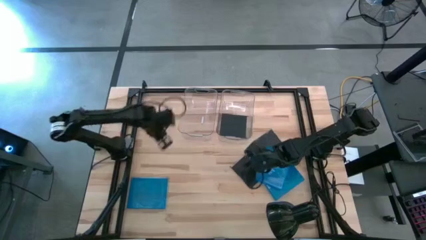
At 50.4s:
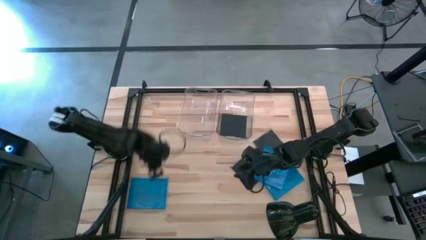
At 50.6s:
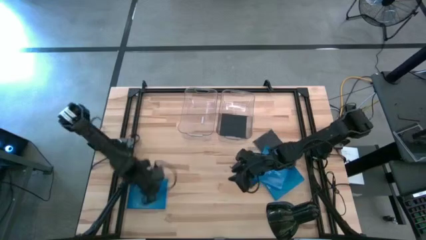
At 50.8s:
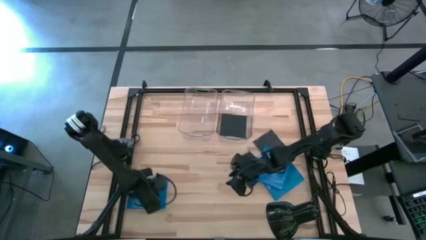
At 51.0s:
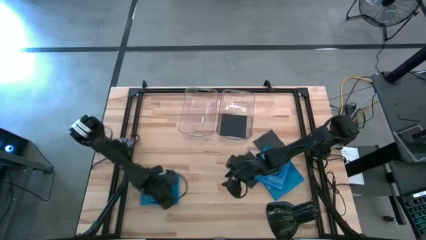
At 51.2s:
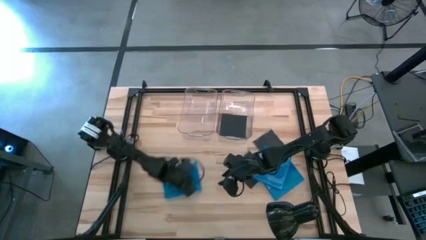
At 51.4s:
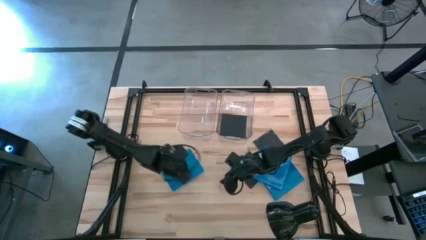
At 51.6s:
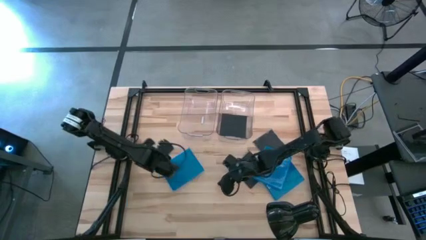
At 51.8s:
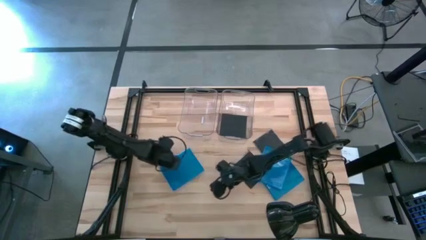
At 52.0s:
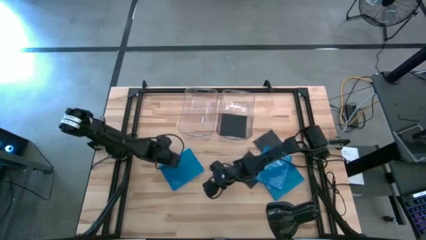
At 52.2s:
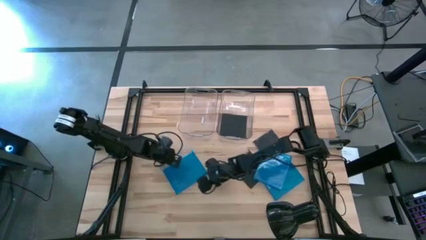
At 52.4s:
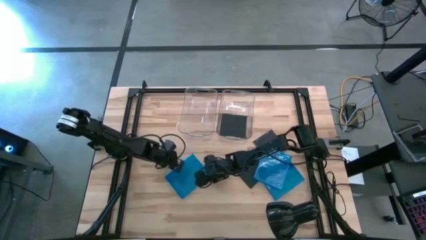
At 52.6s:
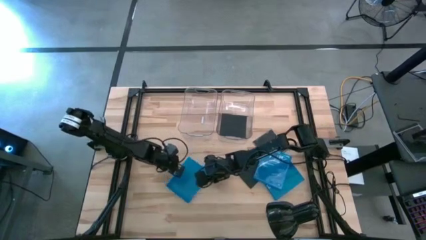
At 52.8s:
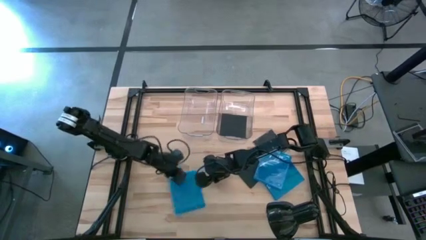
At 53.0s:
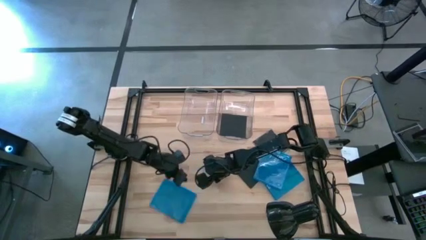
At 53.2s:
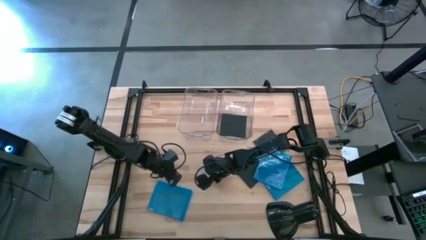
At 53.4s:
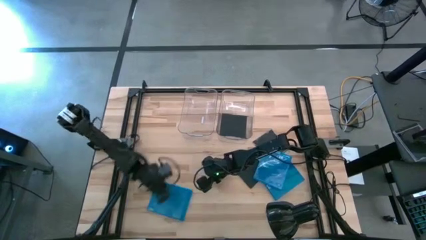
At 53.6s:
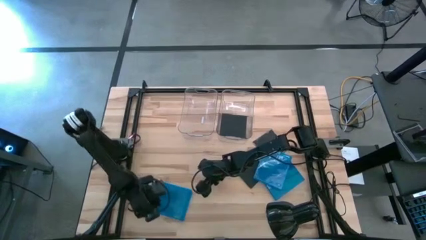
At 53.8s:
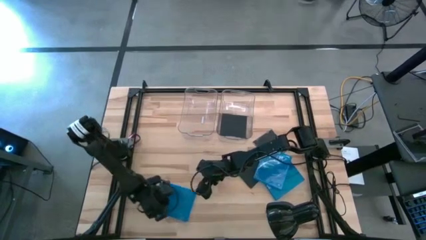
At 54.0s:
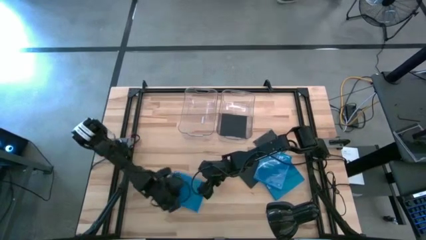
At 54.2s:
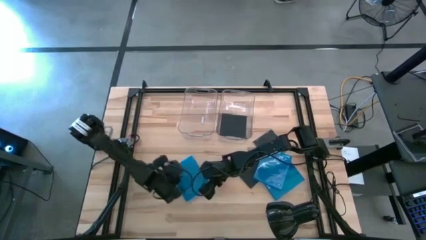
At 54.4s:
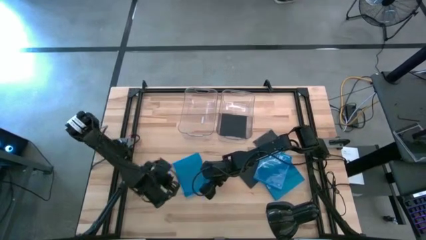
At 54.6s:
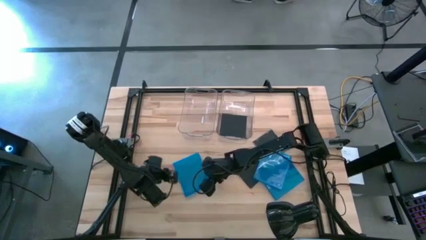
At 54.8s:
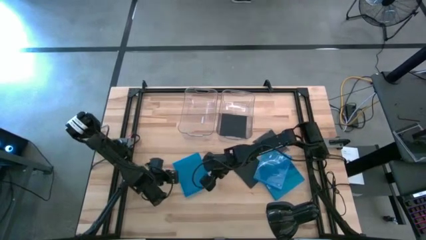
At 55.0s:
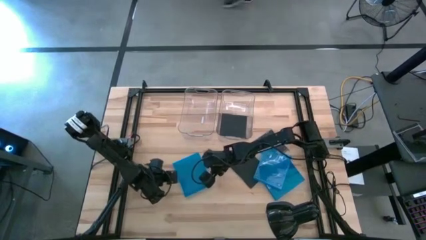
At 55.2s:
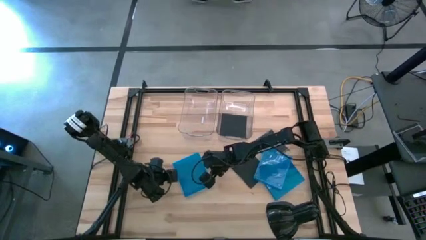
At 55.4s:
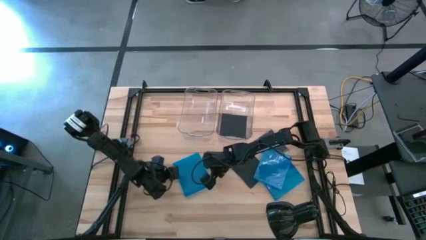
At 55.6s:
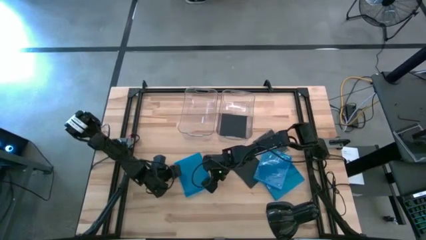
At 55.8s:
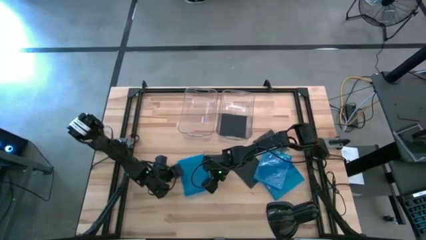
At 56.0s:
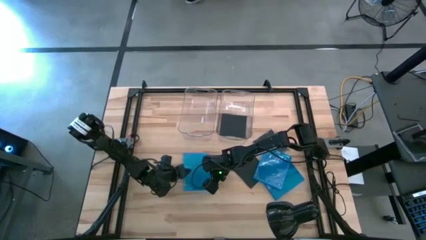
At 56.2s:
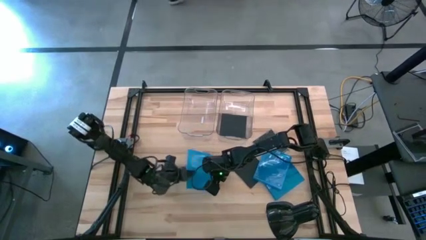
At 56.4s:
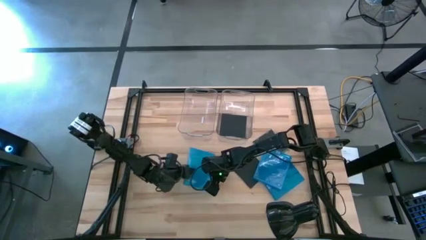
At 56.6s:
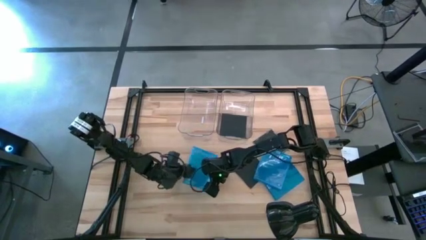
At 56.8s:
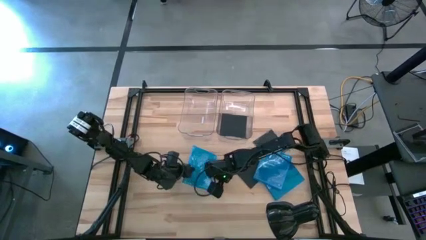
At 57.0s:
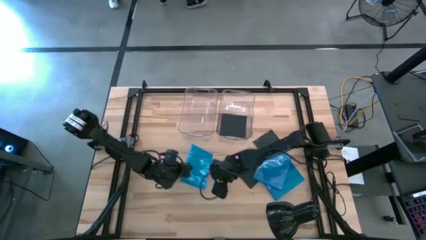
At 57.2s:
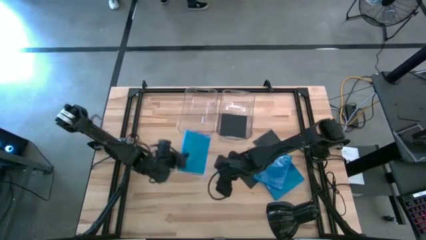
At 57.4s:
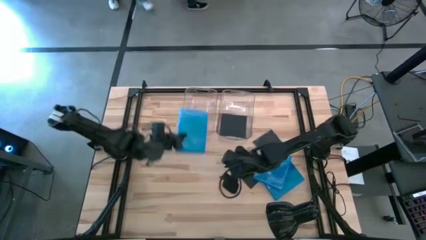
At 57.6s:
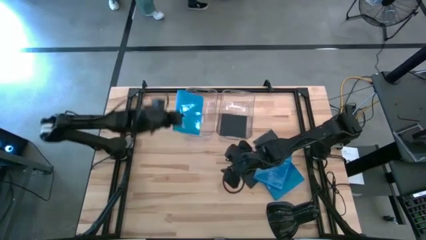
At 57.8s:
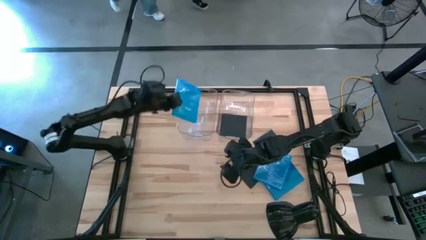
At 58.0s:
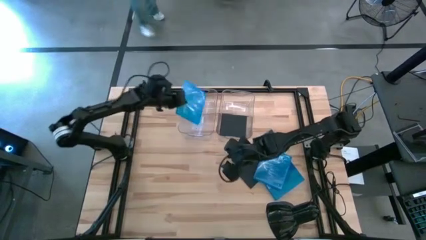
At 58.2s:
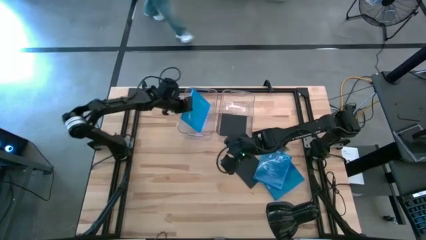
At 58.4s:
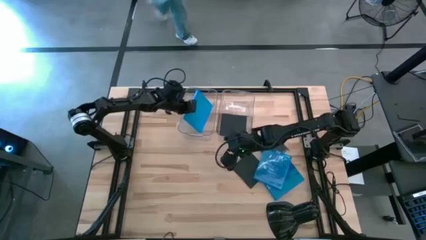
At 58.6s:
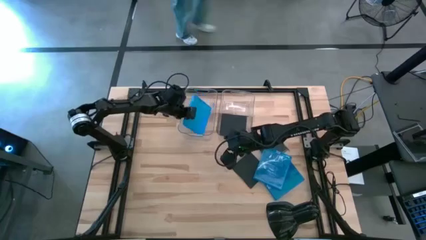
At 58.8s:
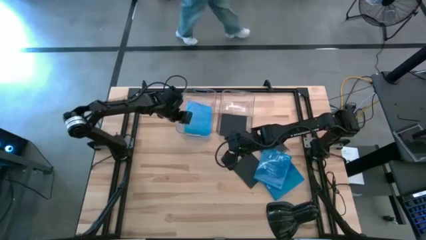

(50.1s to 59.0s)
Task: Pick & place jewel cases by type
Put the left blue CD case into the left transparent bin

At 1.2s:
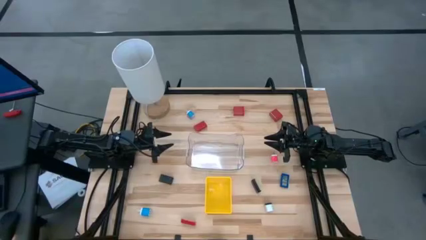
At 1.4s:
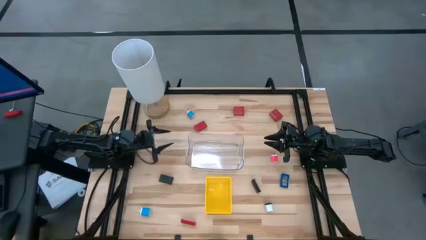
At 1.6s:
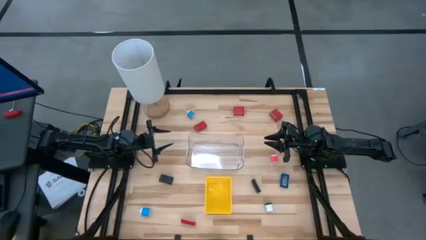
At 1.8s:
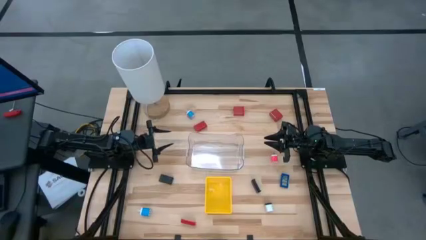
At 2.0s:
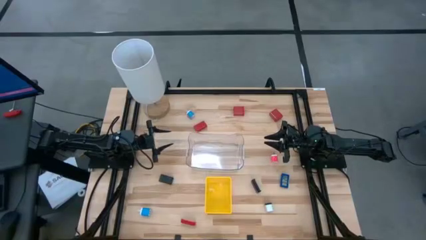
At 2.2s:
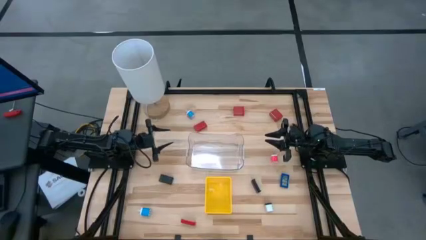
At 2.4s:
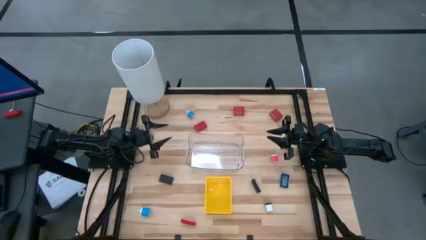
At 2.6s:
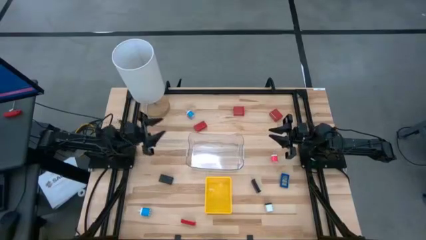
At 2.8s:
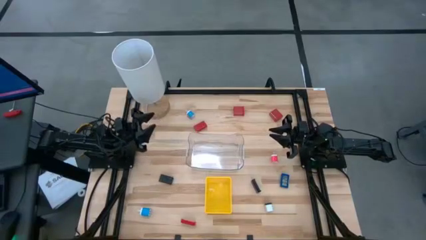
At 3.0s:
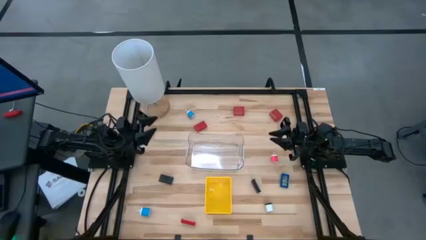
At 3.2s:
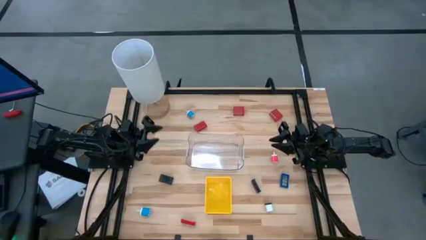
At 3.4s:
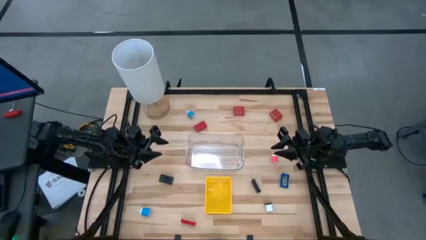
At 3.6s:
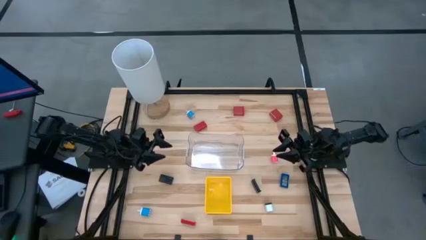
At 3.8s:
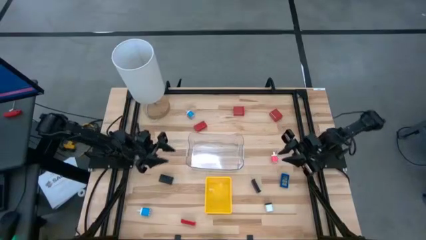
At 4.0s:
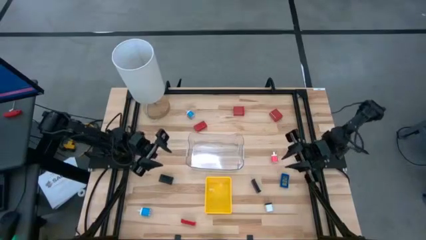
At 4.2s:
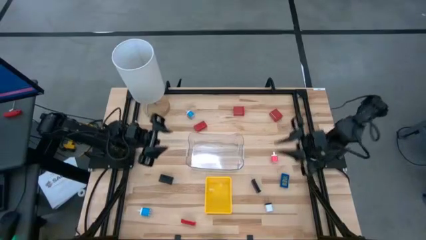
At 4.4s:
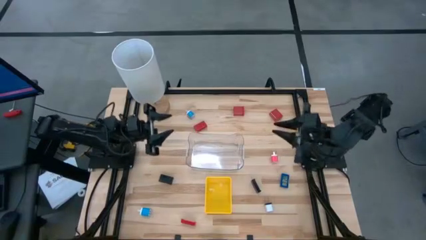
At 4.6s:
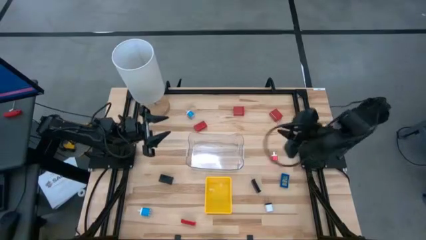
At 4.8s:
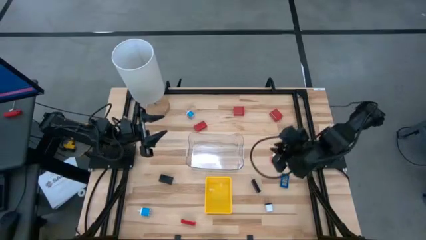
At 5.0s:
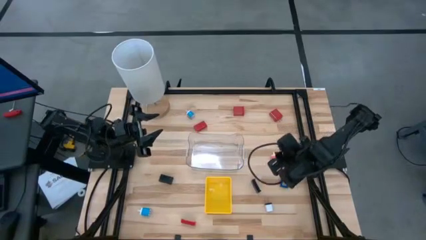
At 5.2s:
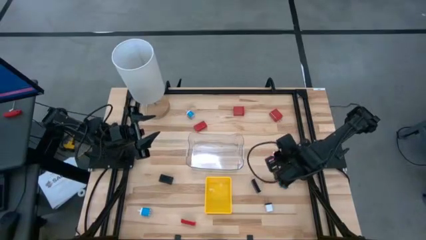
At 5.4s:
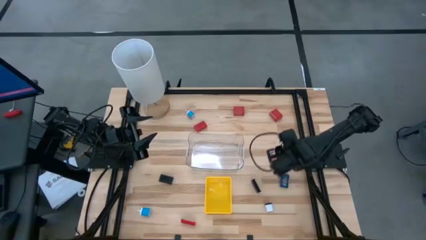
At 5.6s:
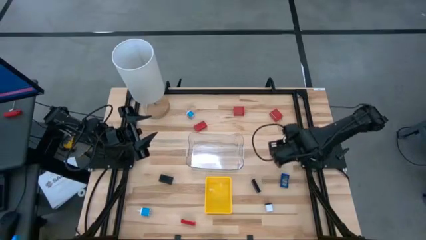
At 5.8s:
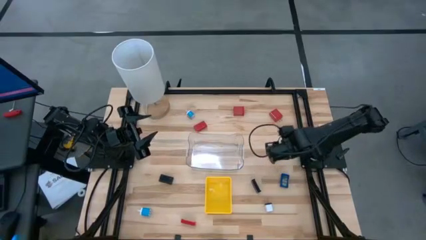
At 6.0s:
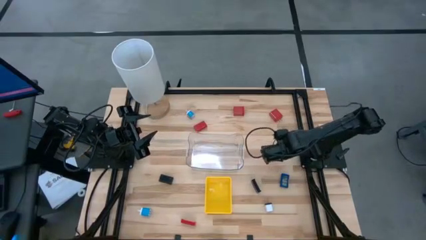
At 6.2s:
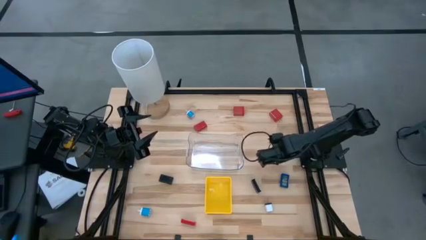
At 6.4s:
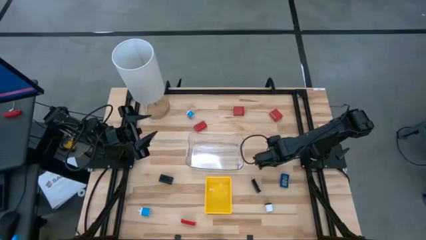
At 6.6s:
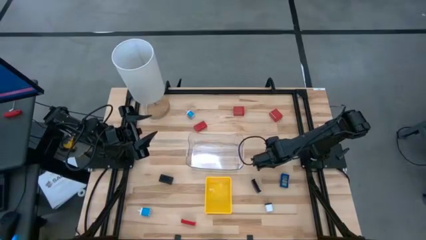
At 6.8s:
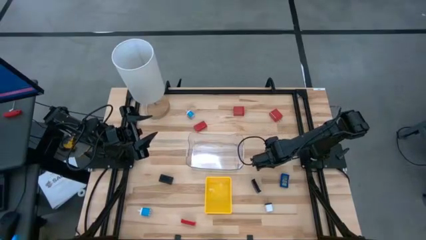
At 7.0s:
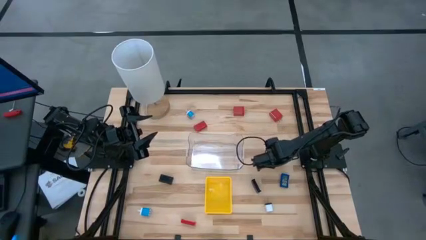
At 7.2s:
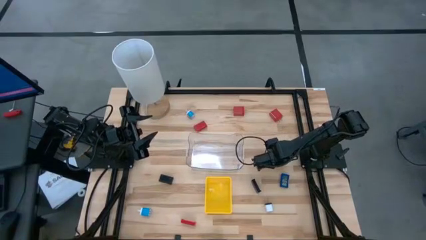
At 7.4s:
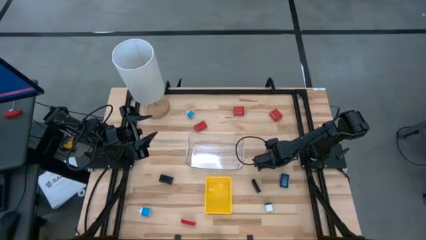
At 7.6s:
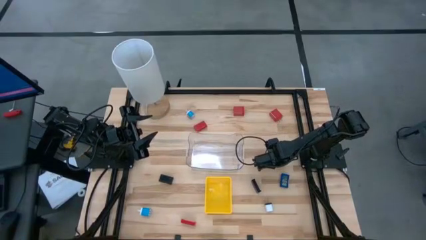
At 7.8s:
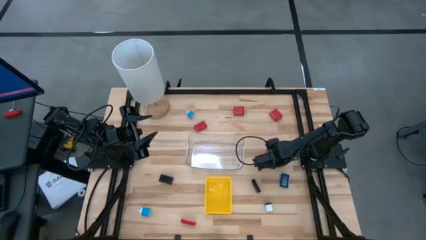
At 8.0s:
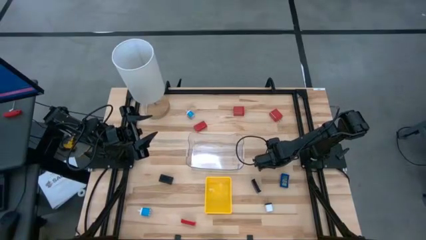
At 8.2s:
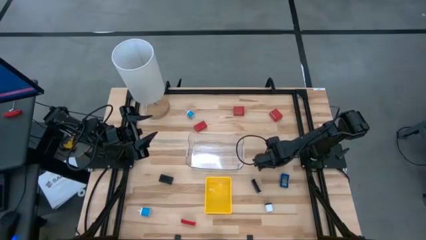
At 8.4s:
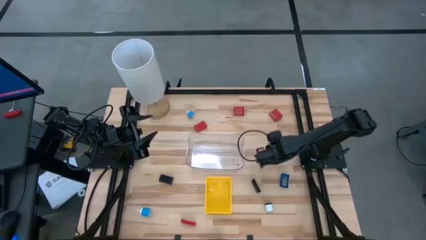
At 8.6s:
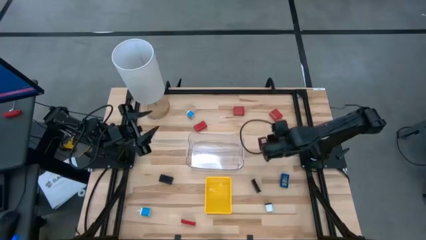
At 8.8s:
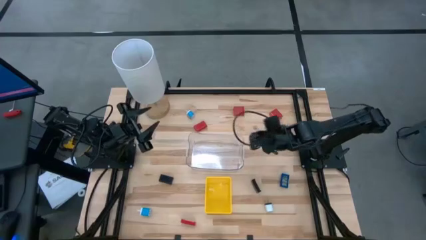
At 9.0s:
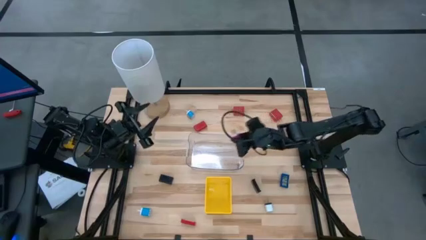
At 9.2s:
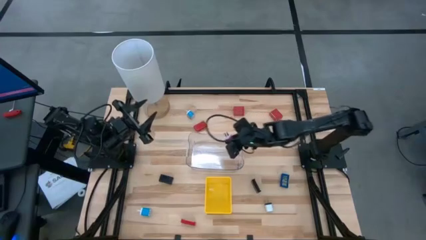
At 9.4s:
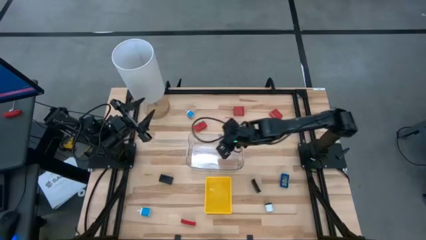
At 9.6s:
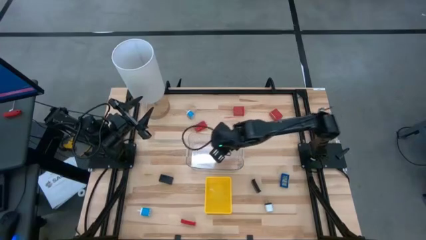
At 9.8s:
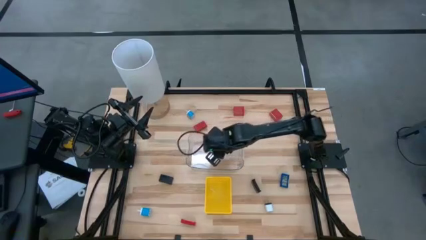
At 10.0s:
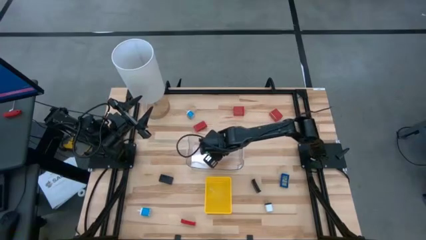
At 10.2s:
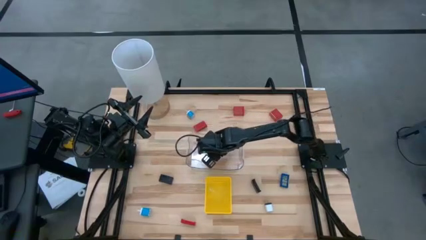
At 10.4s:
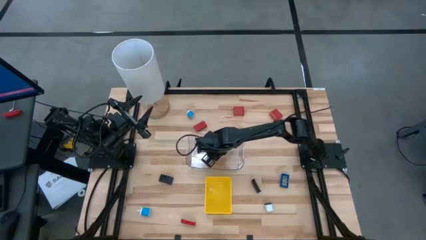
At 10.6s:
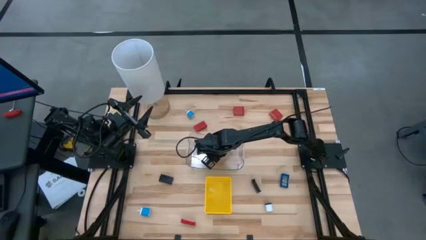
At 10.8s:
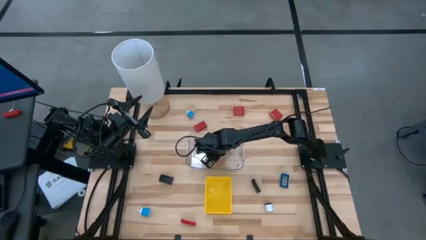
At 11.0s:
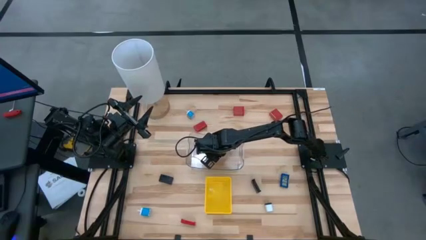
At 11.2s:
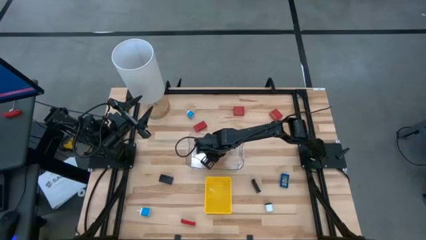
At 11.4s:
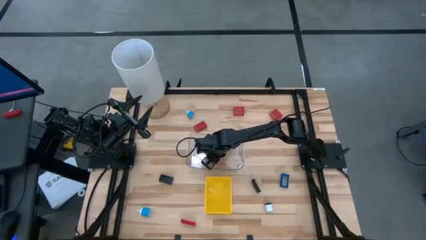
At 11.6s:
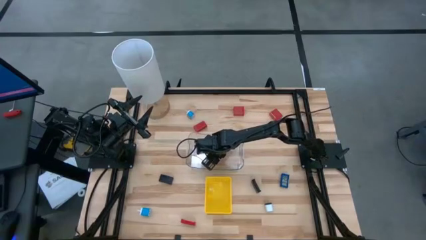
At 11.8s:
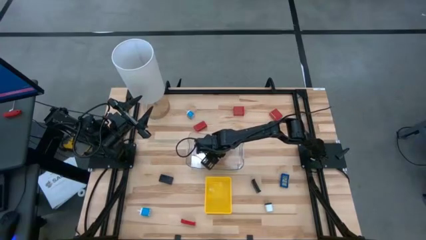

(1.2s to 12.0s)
Task: Pick & Place Office items
Put the pink charger adapter into the transparent bin
